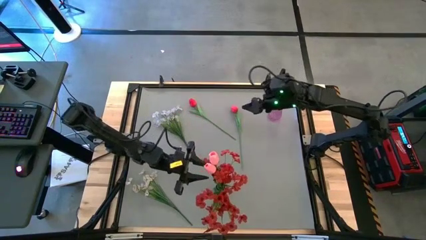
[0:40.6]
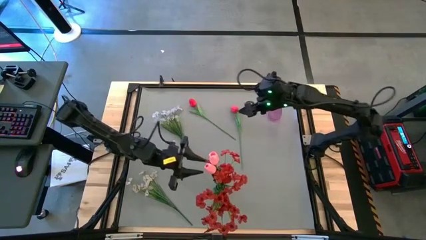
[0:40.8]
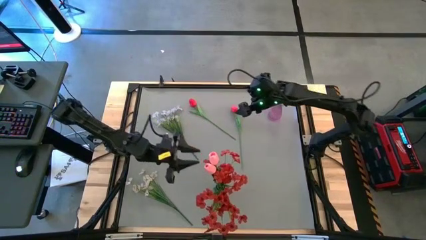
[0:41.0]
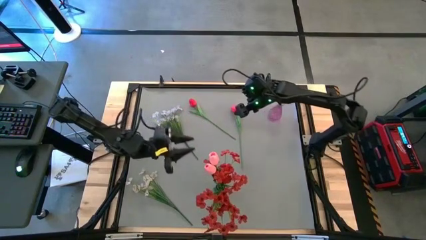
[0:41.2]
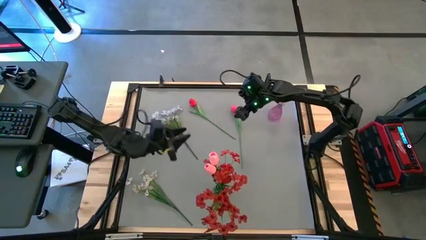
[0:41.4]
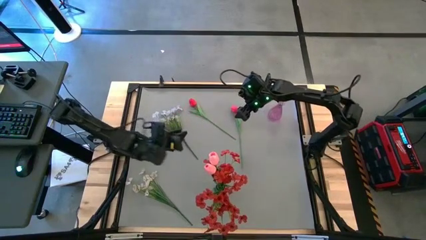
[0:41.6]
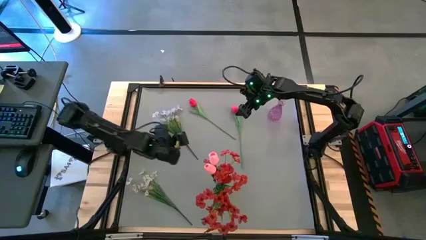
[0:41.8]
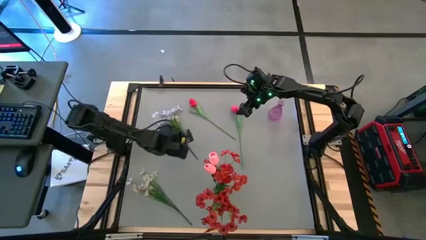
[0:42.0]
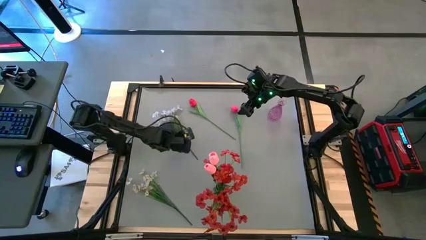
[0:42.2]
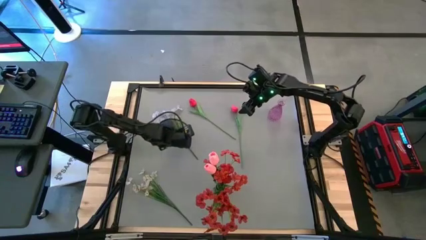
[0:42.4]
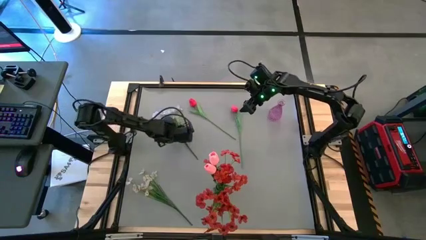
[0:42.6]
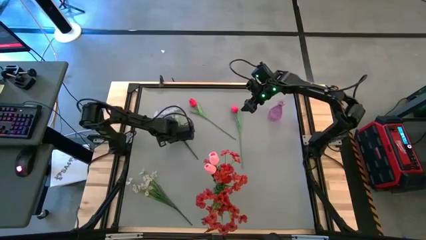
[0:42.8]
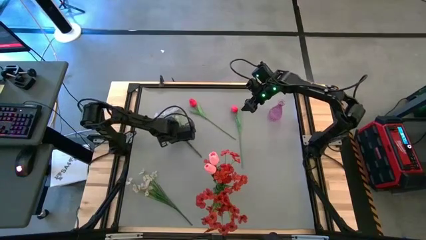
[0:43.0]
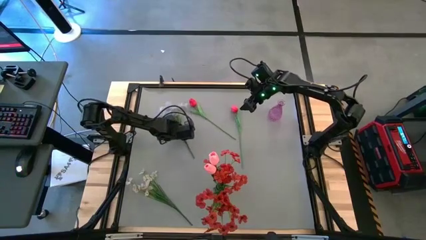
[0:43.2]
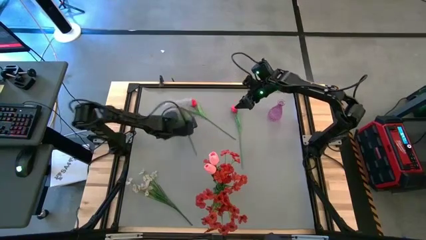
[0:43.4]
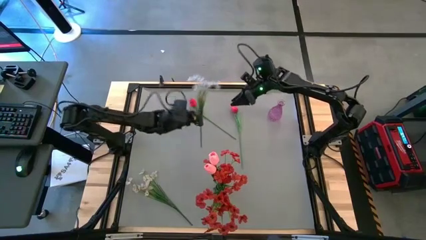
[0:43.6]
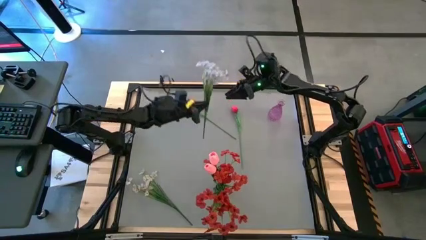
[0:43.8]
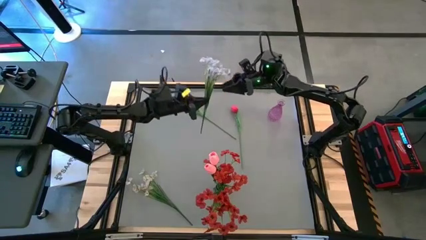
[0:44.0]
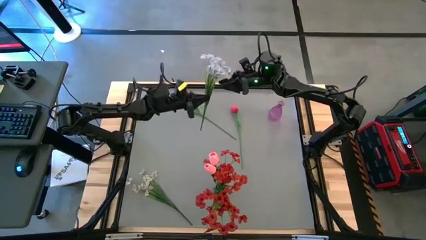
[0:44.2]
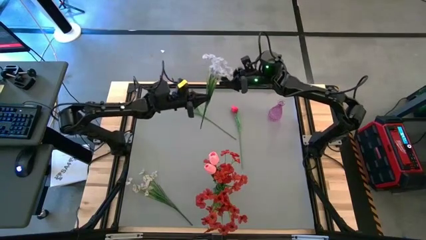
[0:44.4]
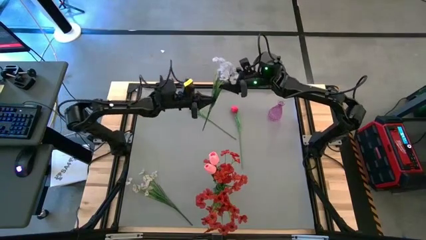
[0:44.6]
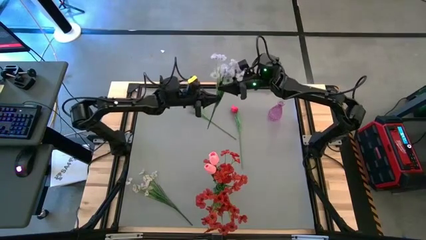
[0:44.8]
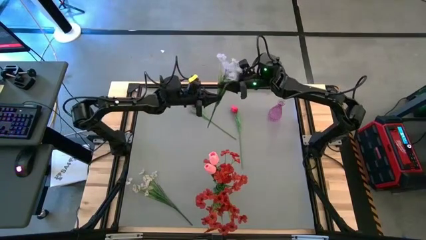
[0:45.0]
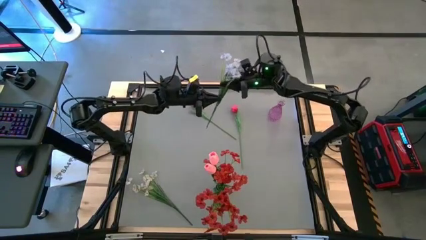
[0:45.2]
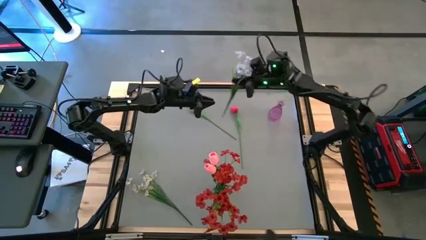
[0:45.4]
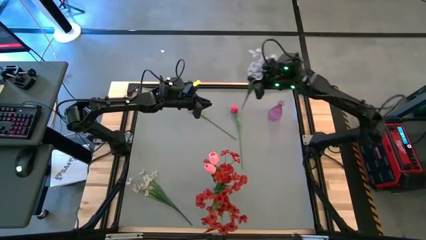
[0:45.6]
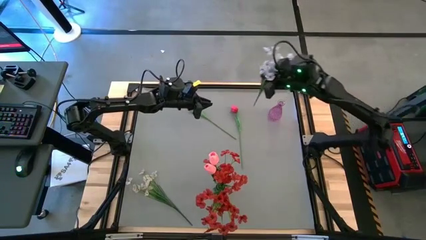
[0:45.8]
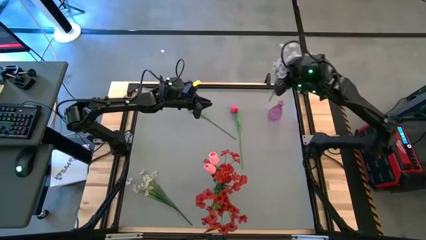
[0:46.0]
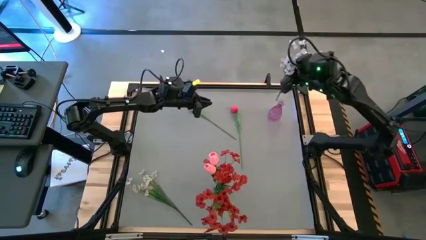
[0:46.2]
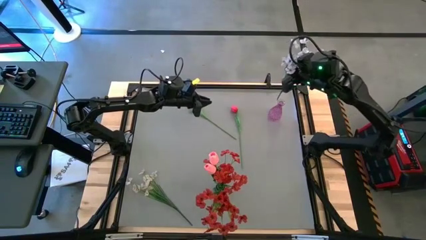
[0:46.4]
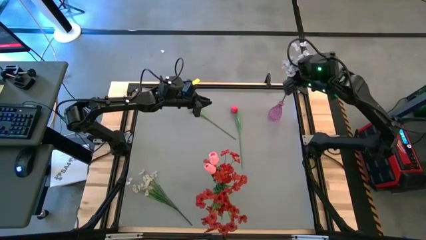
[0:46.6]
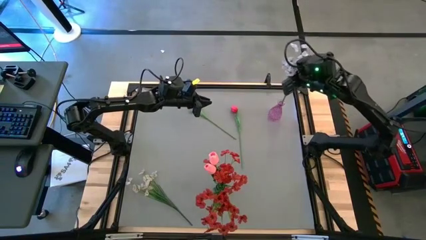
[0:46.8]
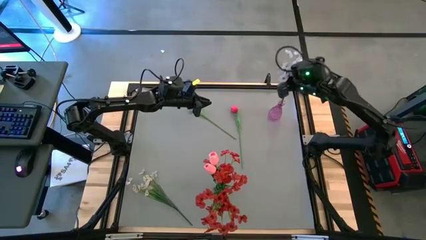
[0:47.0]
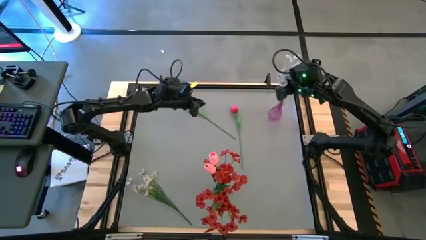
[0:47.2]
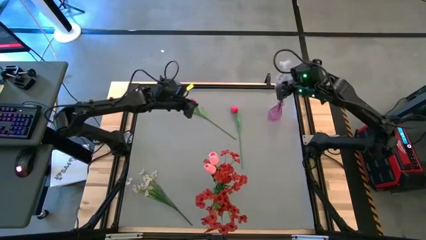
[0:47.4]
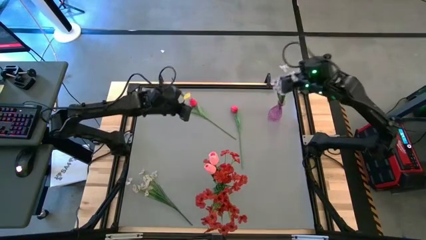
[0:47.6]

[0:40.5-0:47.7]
Task: Sort flowers into vase by color
Put the top white flowers into the purple vase

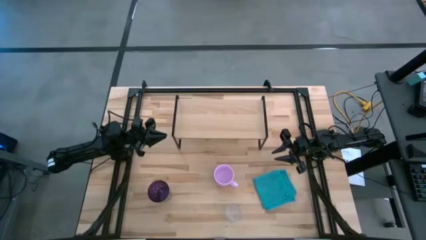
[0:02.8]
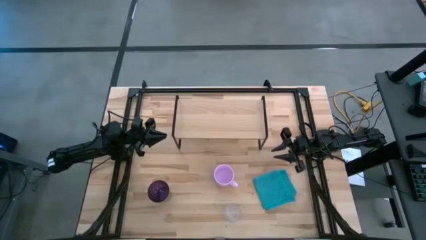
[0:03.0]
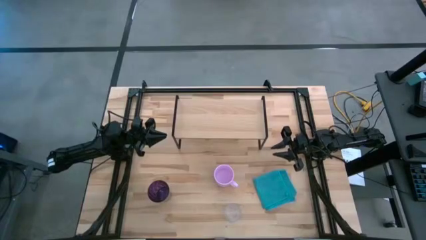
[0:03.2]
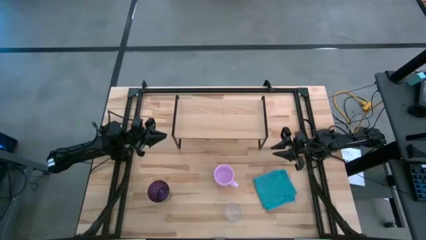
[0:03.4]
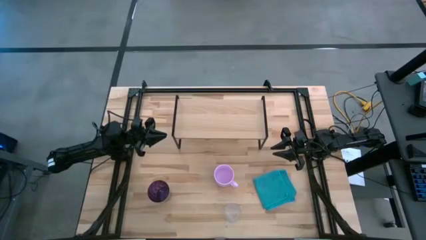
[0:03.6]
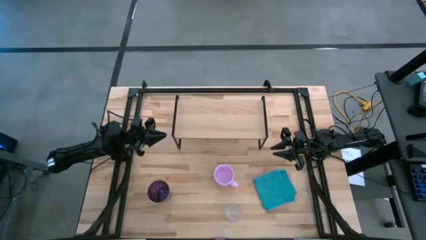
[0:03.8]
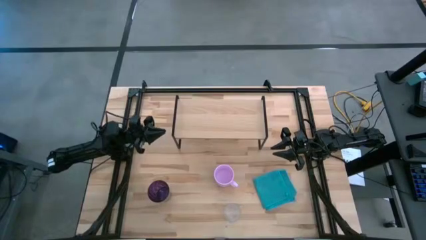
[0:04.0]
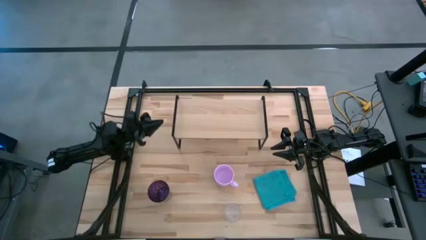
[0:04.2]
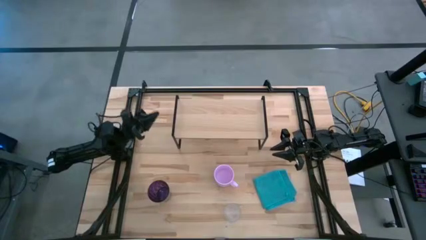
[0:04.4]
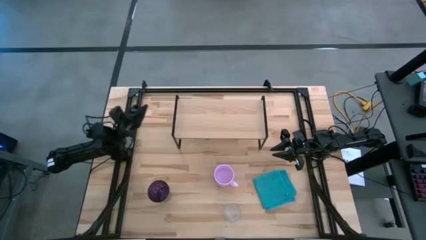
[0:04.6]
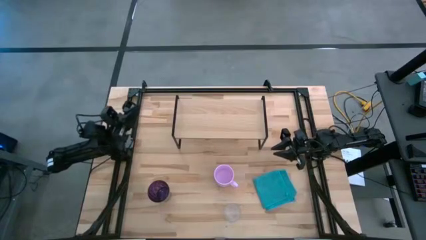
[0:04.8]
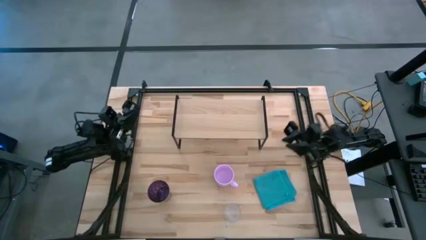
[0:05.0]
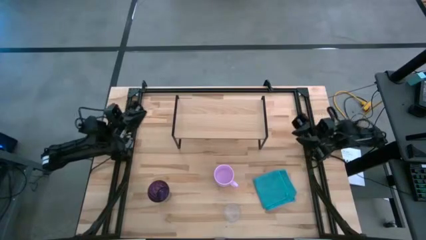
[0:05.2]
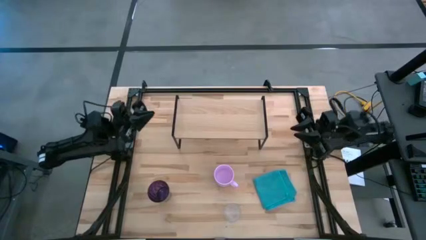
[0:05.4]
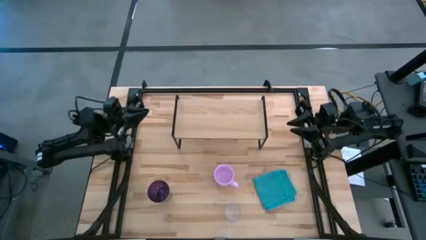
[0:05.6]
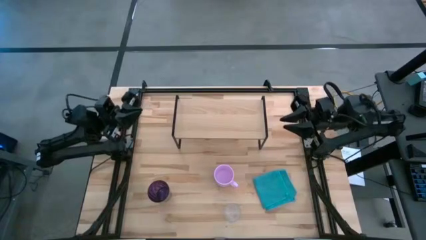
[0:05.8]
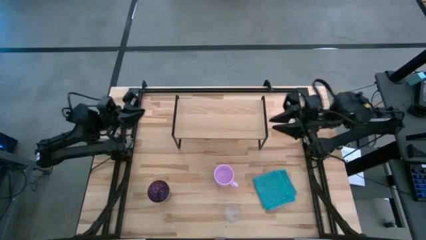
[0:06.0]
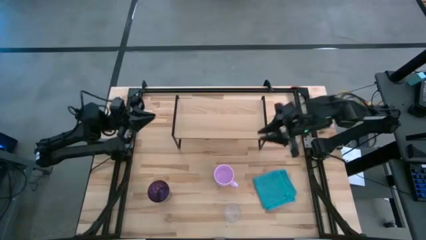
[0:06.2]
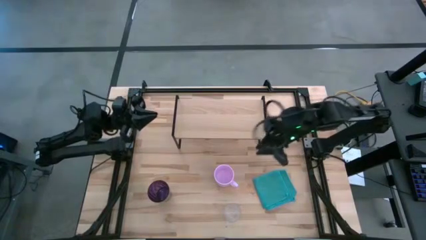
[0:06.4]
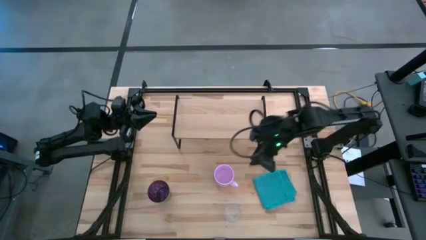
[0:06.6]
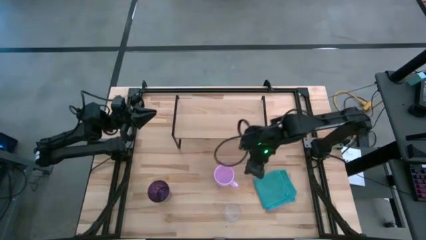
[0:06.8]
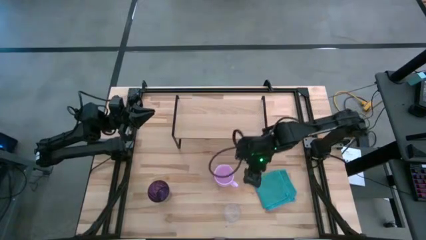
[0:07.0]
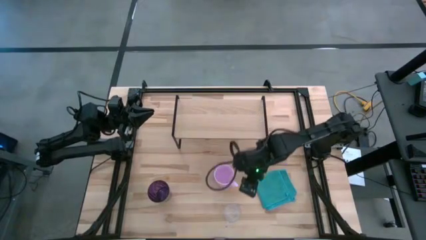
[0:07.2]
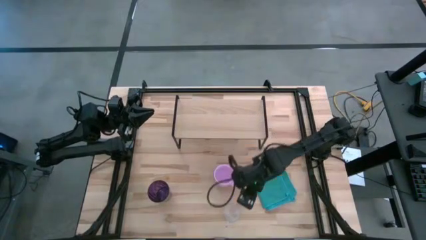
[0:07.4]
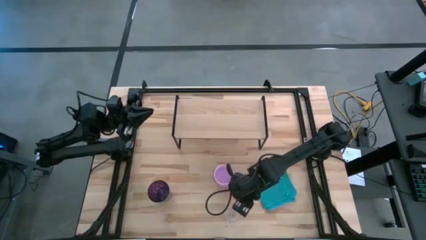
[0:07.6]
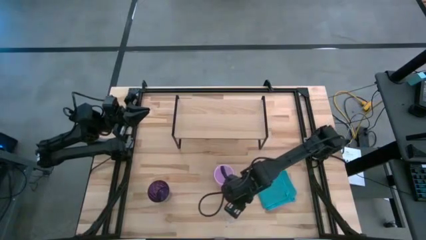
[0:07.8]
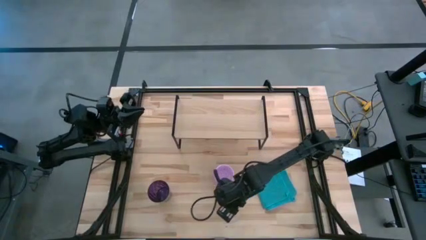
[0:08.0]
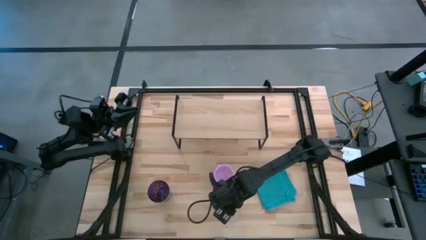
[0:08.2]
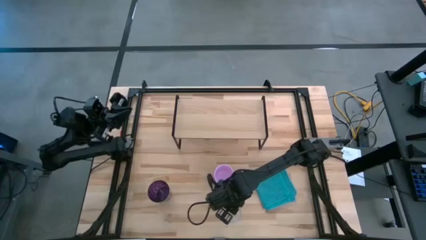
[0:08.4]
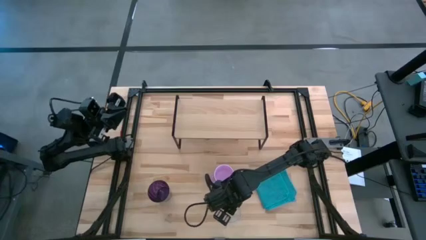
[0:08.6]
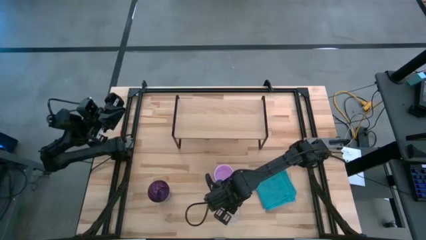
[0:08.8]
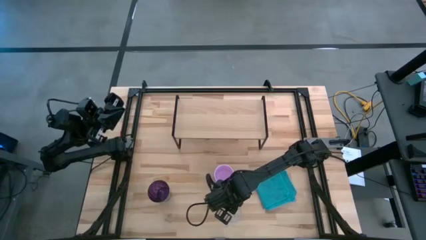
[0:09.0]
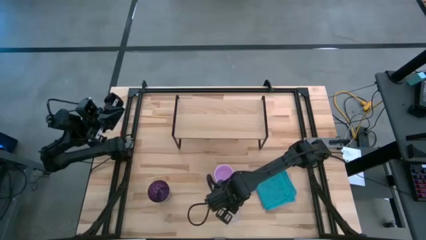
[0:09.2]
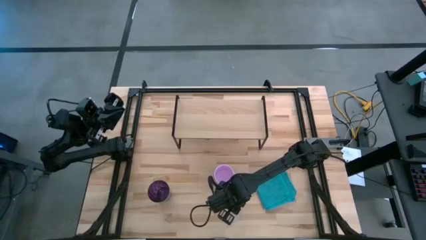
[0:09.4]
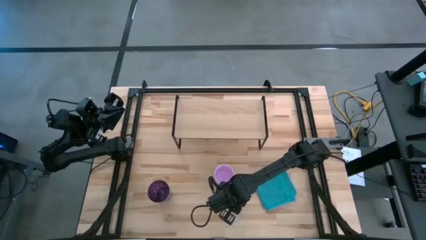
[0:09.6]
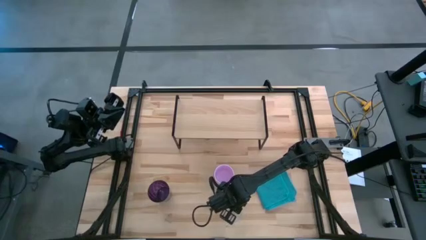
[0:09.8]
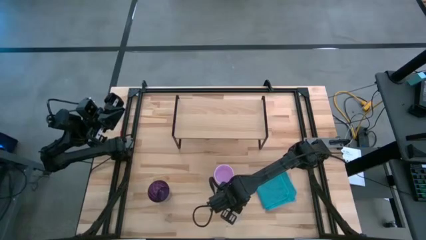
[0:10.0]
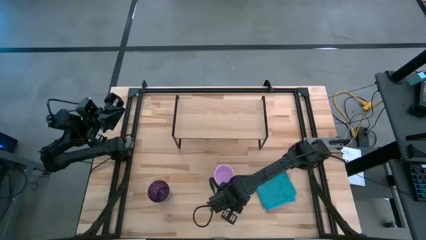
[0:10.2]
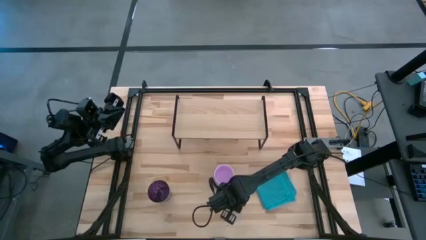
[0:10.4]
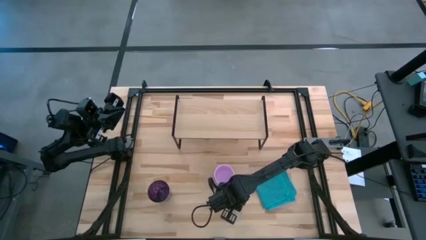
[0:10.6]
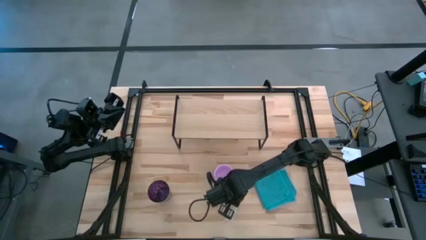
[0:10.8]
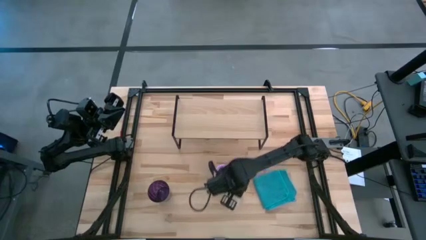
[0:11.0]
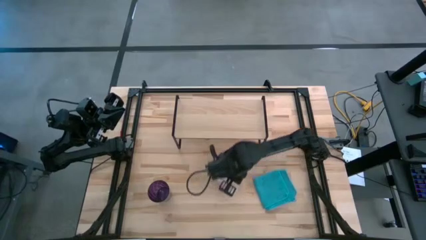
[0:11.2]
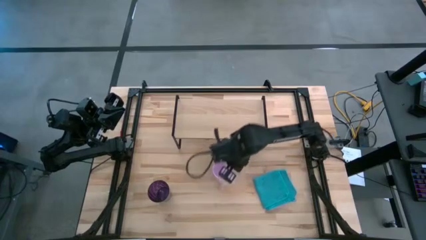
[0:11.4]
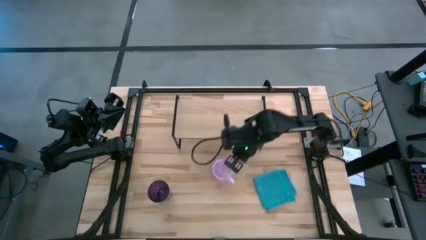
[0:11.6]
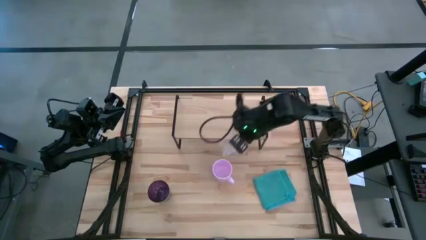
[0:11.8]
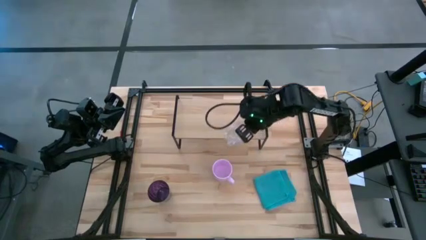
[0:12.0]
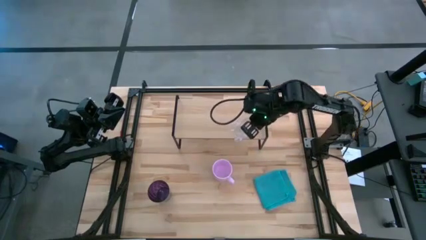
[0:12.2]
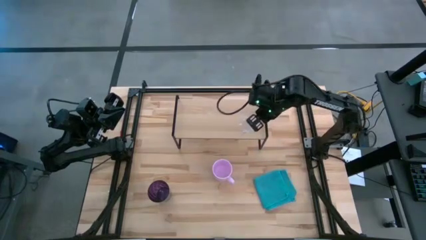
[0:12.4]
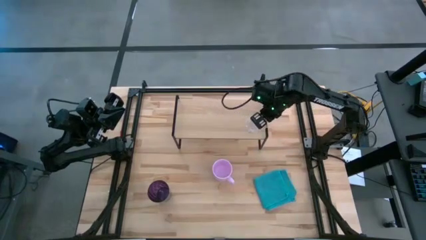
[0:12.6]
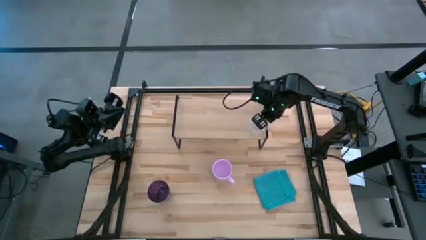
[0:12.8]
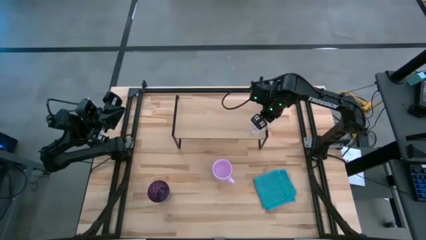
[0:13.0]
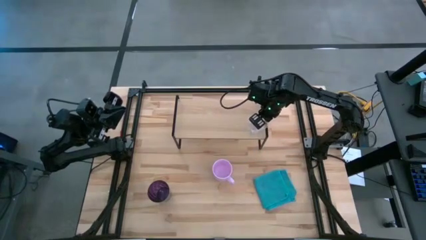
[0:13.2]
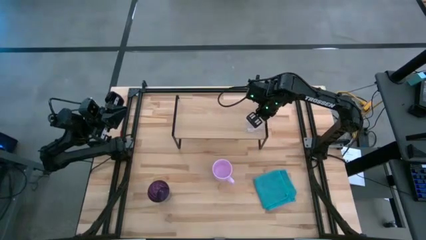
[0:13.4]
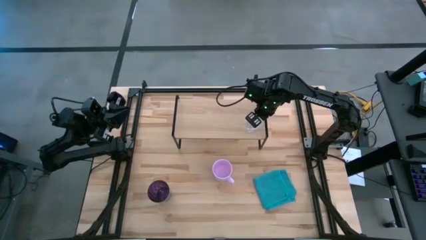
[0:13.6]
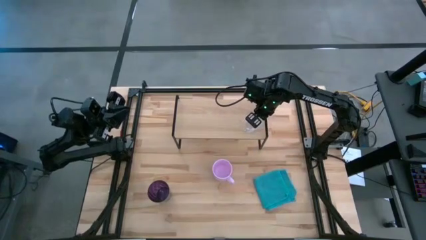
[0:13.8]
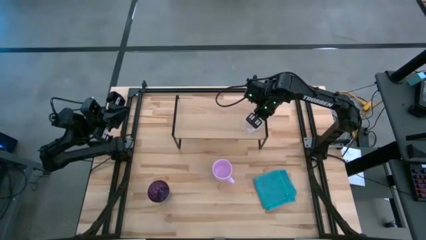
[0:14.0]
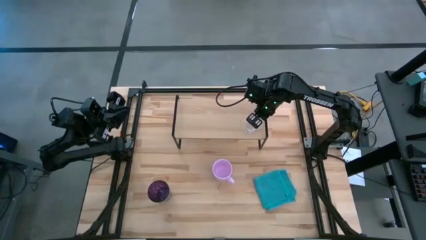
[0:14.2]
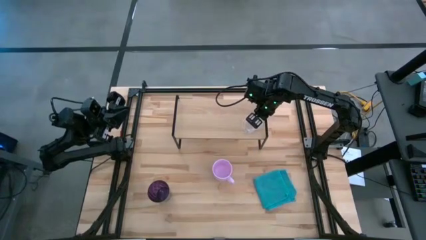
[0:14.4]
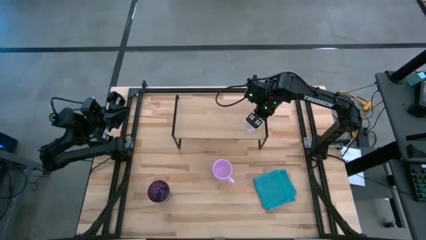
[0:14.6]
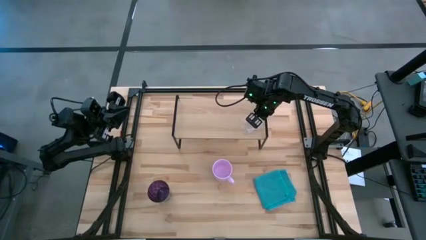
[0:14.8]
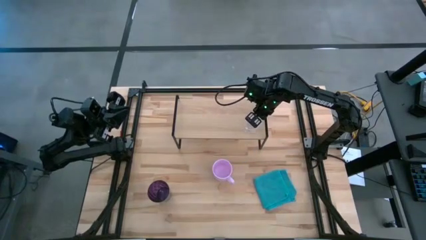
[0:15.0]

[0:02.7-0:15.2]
Task: Stack small to large cups/mugs on shelf
Put the transparent mug on the shelf
